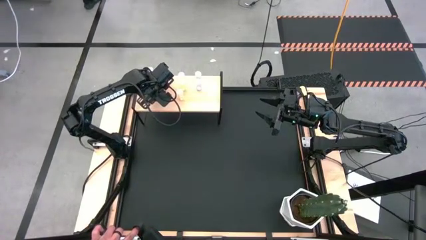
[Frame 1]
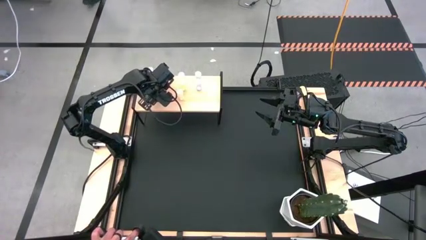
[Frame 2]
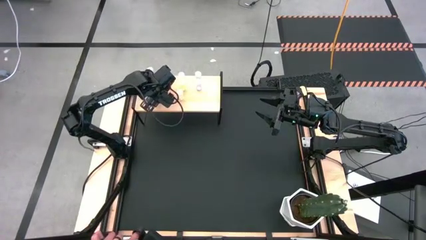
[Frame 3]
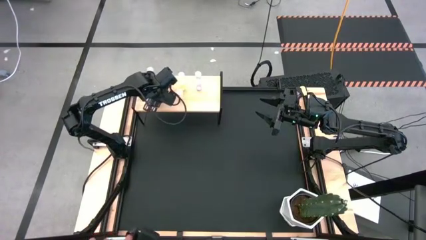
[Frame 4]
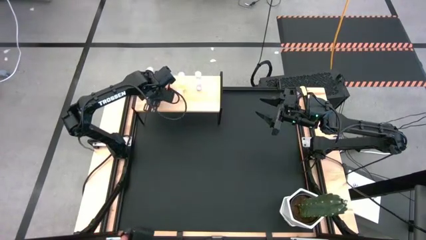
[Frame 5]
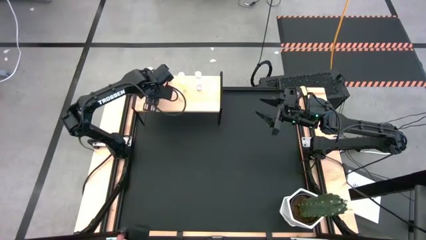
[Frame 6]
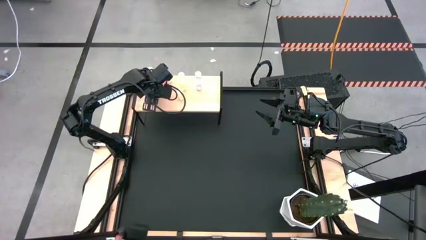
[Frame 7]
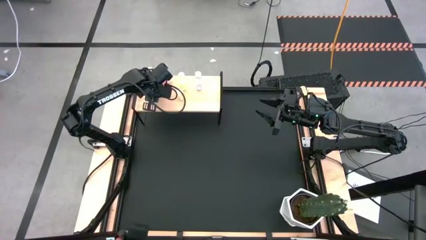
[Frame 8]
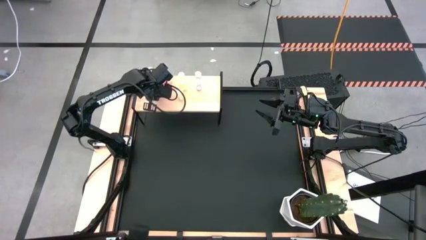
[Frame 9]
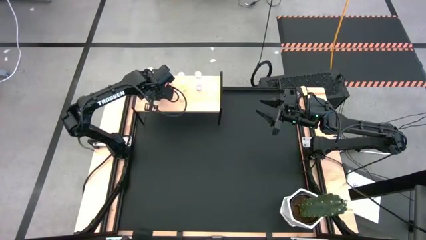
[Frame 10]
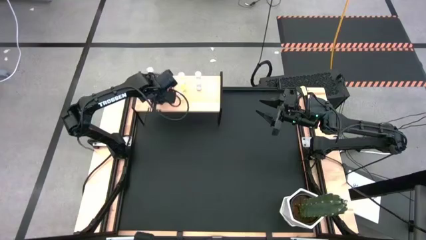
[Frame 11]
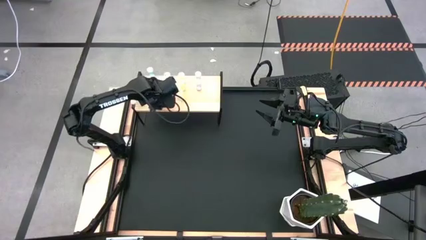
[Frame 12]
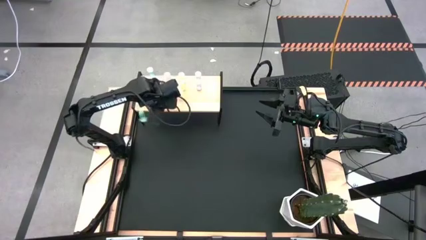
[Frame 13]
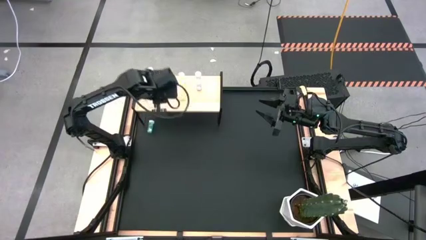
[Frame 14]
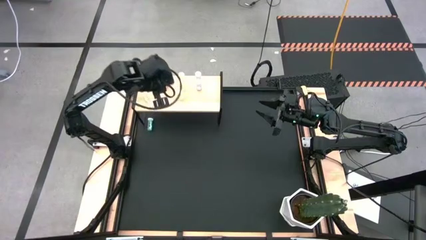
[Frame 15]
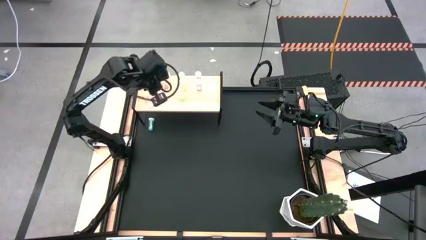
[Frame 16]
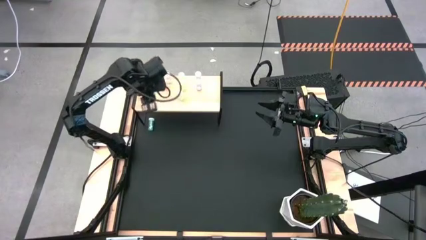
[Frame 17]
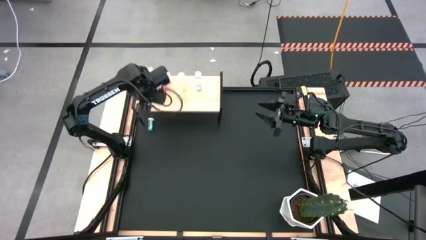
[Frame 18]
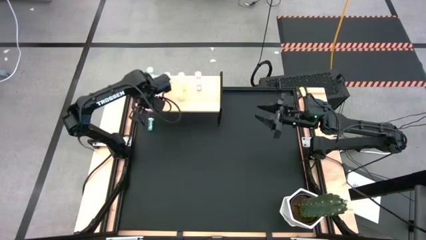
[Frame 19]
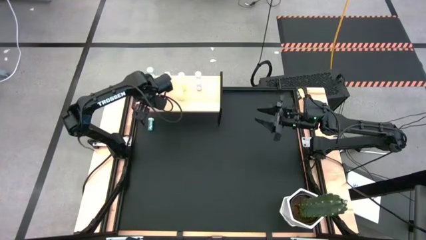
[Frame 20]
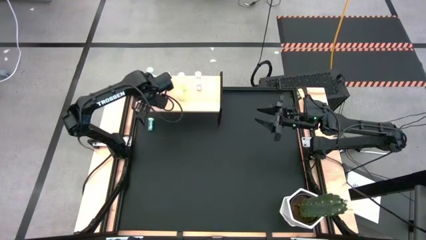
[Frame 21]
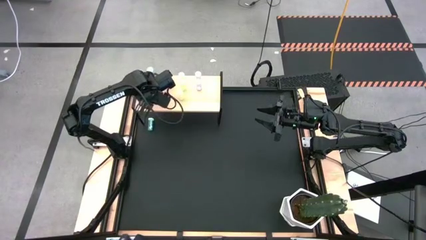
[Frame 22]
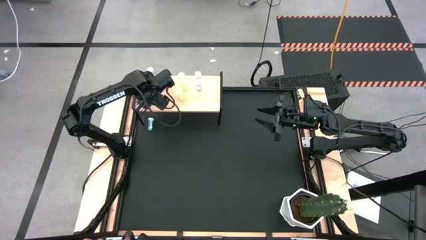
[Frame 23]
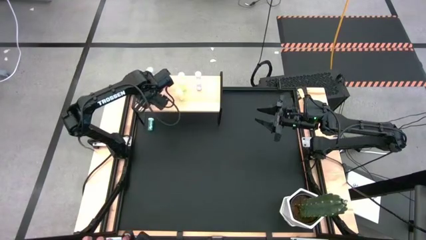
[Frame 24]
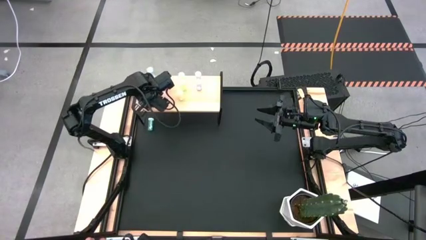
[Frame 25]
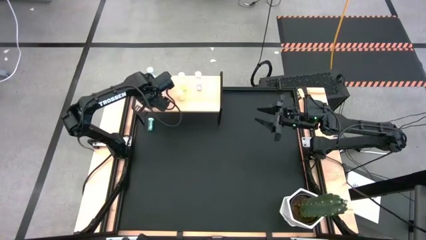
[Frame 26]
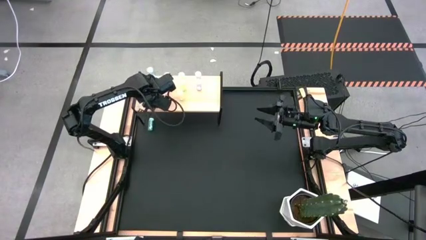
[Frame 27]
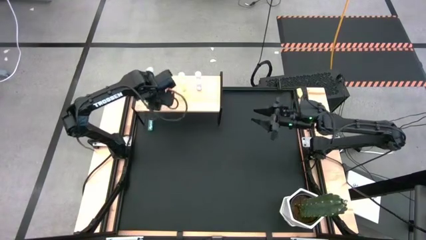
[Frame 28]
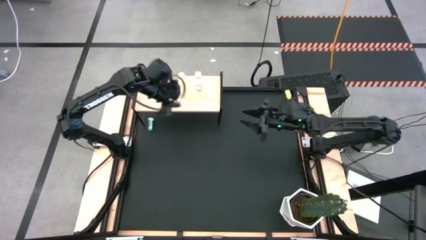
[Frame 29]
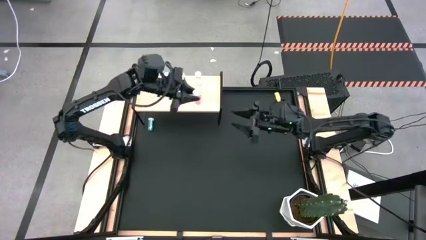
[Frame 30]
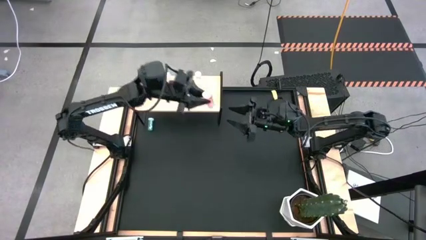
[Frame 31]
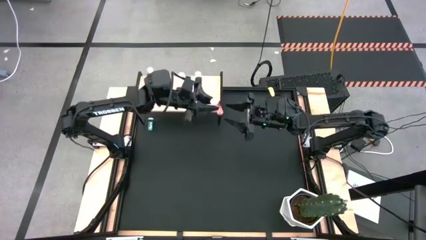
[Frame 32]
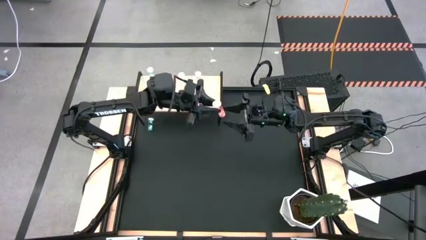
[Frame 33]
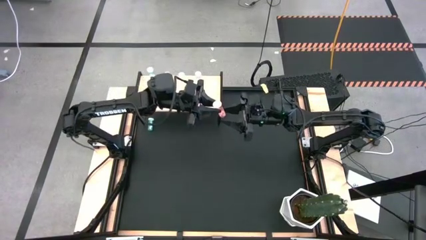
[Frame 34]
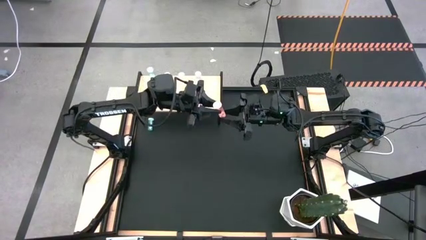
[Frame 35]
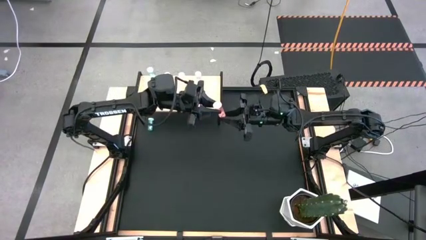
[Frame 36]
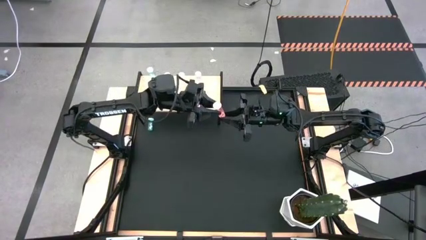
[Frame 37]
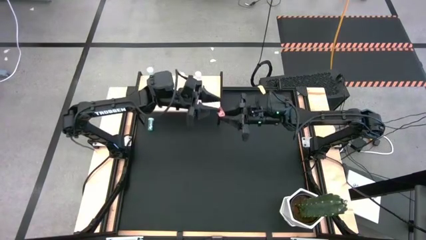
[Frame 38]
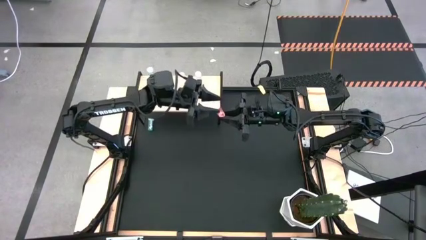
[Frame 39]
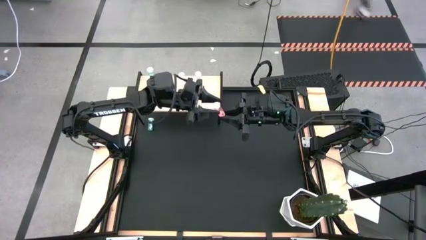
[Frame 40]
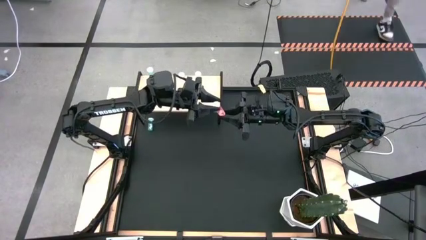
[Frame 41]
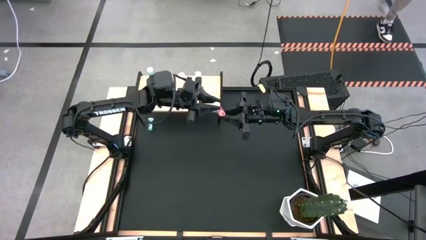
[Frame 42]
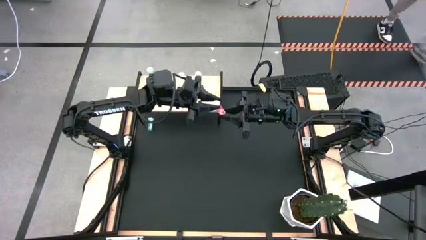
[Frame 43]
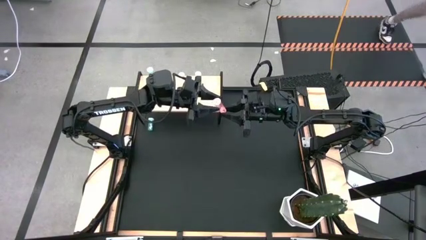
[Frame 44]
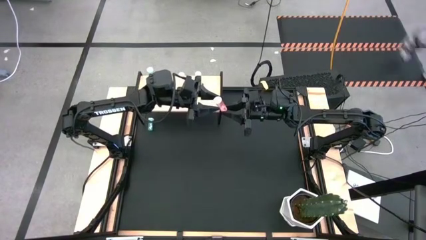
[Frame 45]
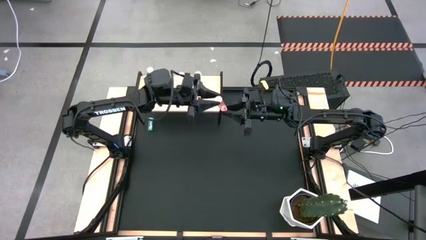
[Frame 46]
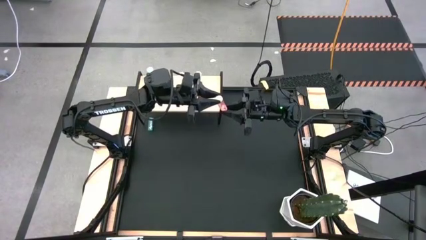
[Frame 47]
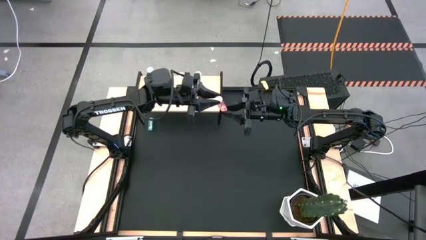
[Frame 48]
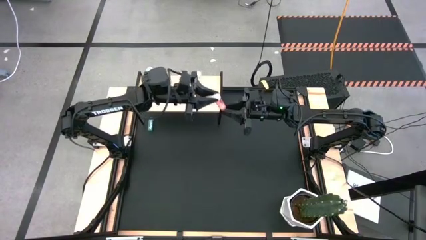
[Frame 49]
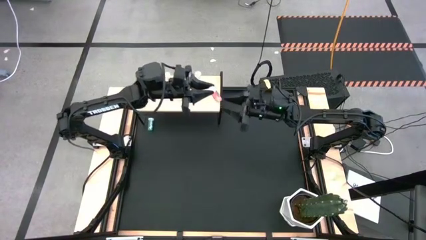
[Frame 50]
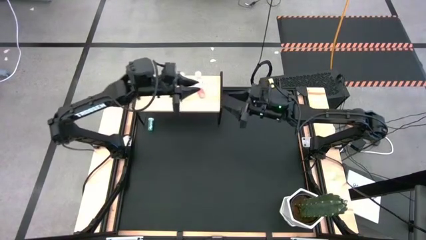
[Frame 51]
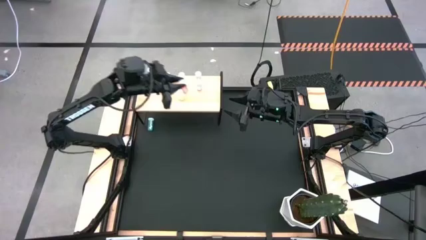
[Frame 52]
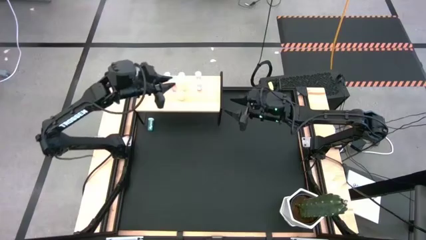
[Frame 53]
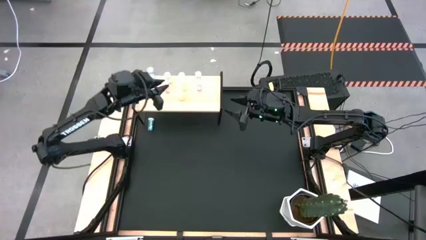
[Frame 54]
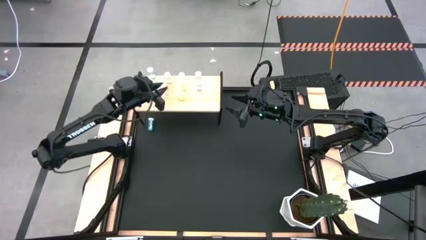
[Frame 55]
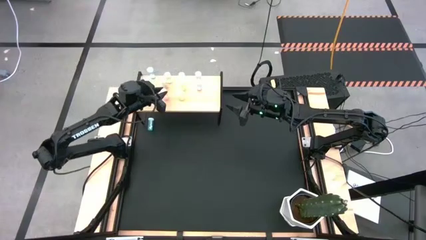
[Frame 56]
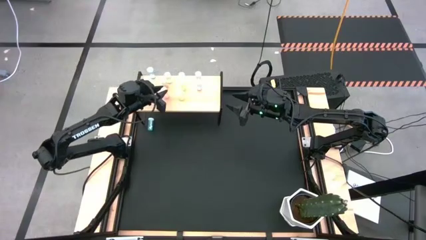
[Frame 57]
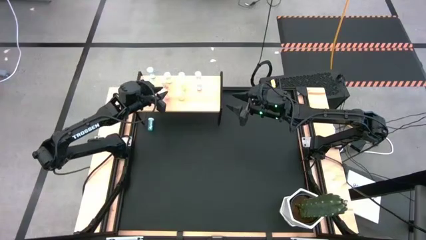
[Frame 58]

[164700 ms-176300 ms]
Task: Pick and place medicine bottles onto shelf by color
Adjust the pill bottles on the shelf

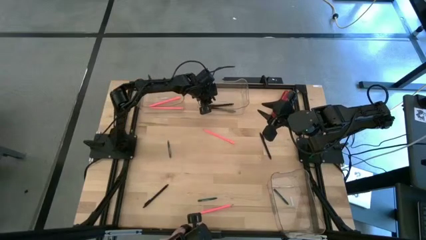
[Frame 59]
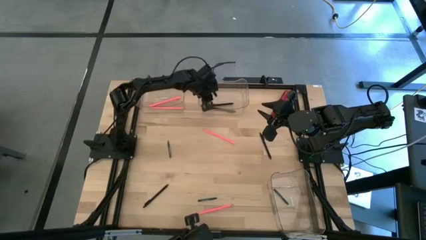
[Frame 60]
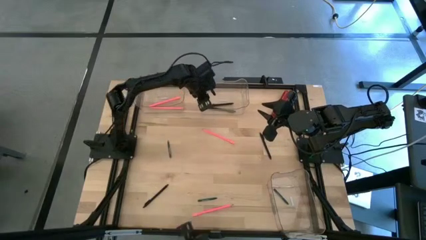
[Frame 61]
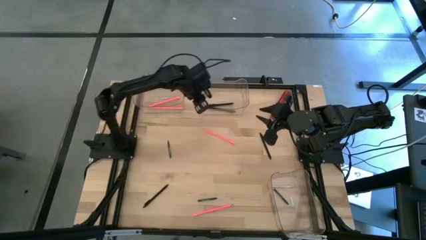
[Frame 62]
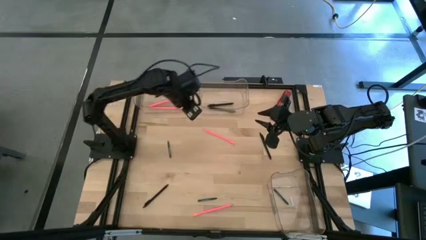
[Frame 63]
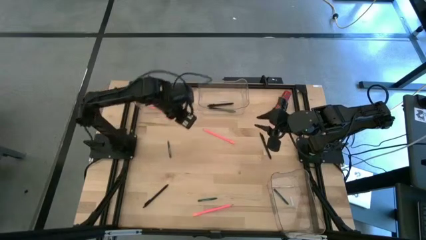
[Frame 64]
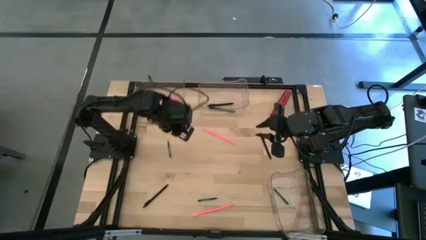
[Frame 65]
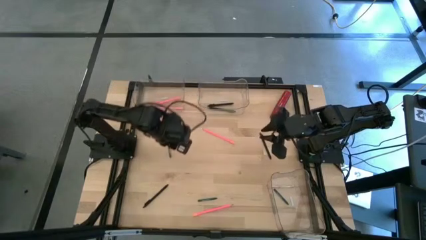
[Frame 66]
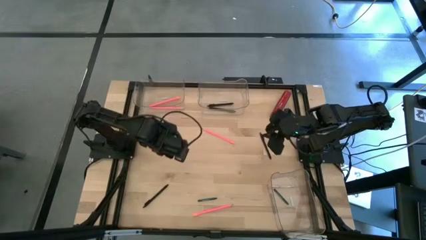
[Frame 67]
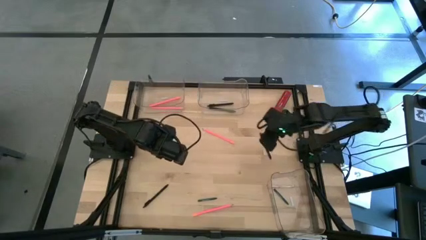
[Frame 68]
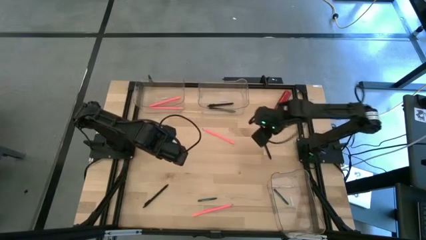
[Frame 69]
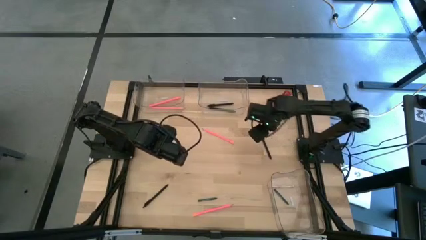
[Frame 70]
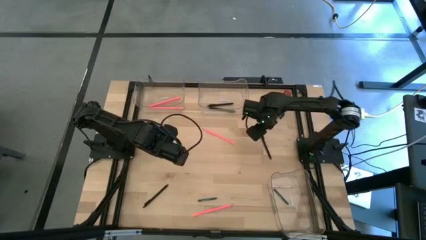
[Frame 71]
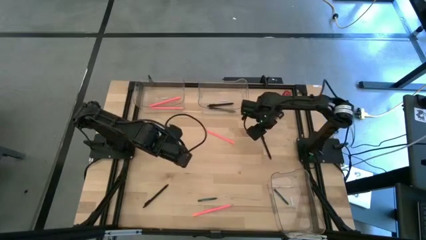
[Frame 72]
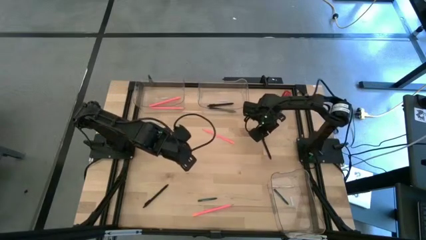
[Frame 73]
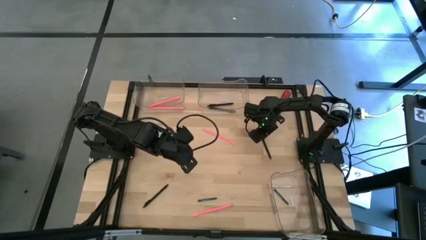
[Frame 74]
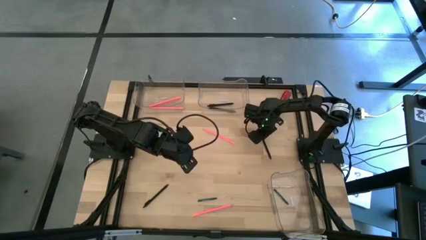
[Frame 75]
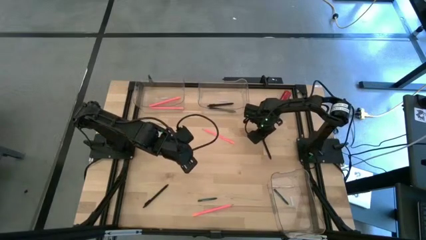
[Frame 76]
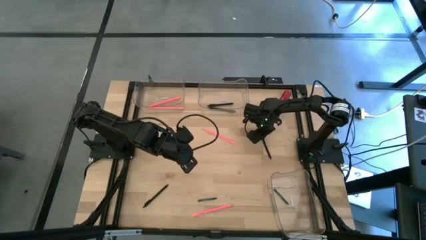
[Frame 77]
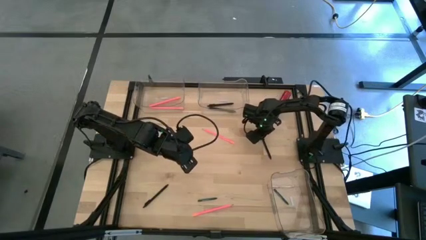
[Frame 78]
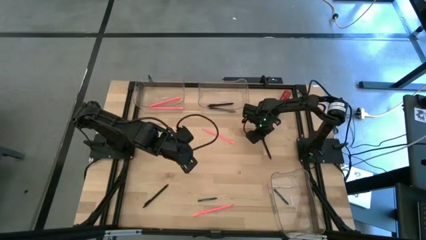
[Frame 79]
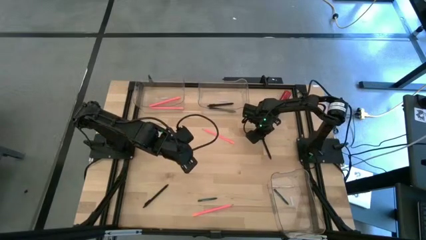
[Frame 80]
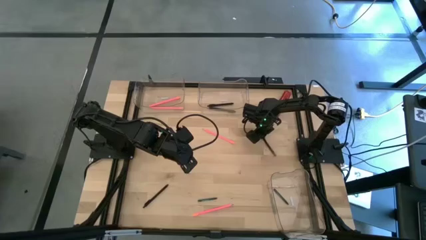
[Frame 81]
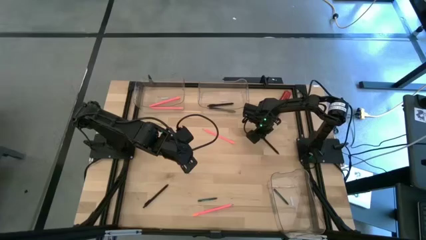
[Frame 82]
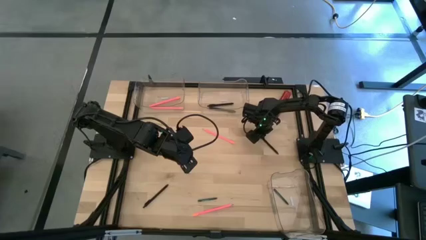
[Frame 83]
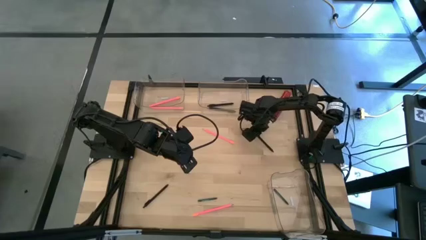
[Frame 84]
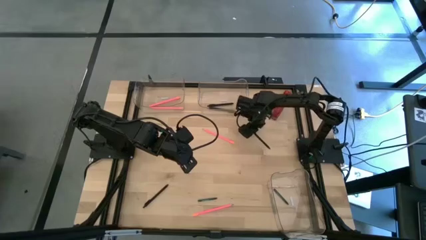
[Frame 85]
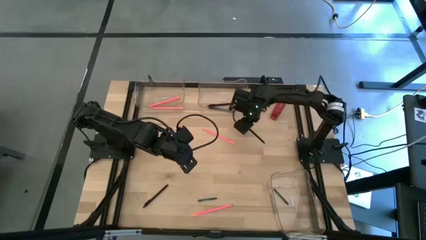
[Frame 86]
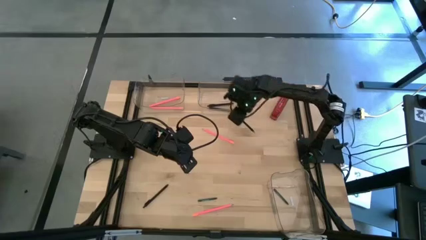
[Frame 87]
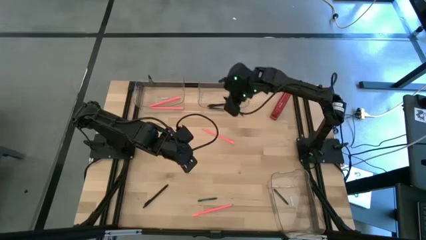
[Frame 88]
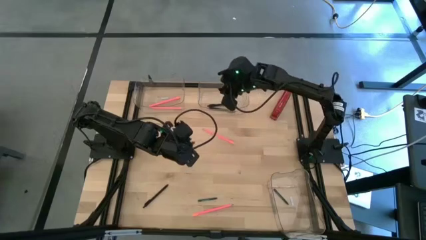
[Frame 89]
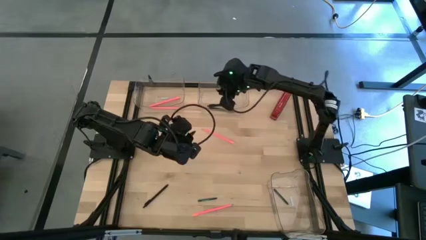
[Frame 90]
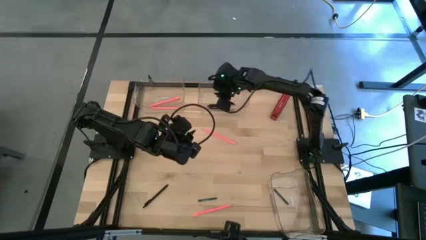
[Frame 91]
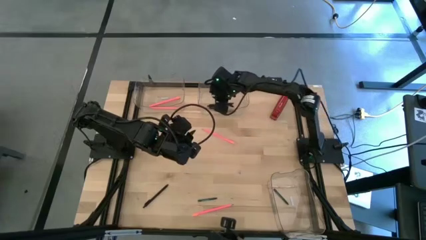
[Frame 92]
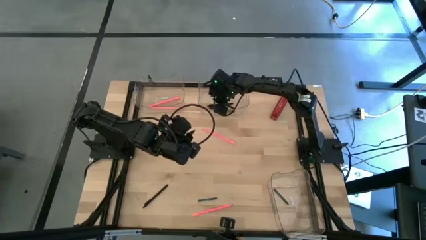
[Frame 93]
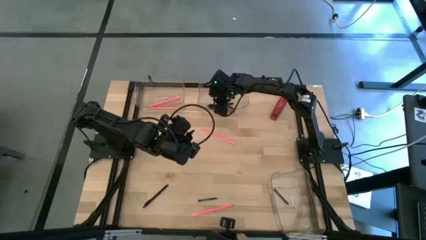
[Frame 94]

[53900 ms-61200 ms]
Task: Sort crayons/erasers/pens/pencils in bins
Put the black pen into the top right transparent bin
